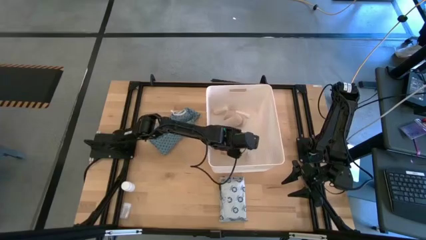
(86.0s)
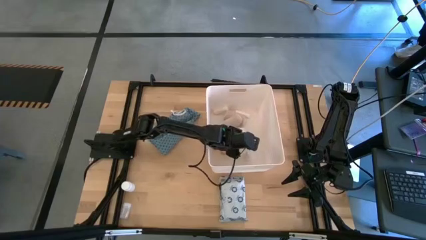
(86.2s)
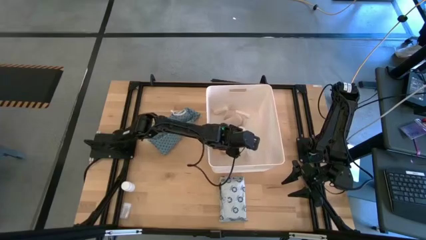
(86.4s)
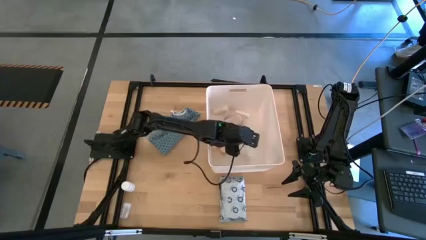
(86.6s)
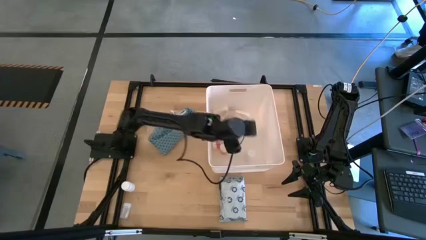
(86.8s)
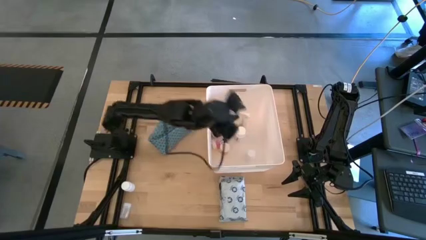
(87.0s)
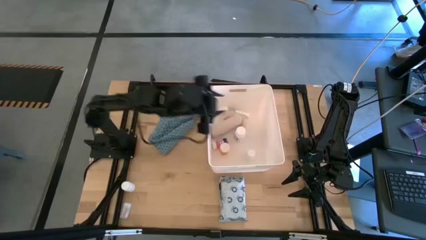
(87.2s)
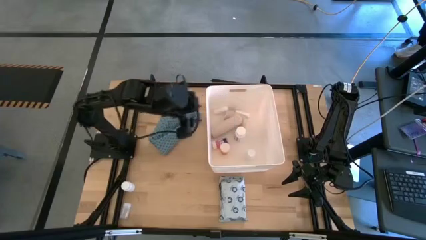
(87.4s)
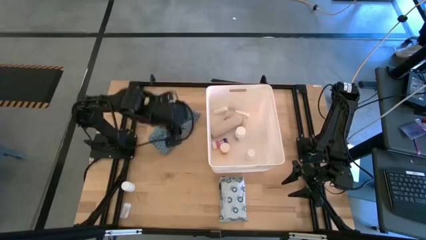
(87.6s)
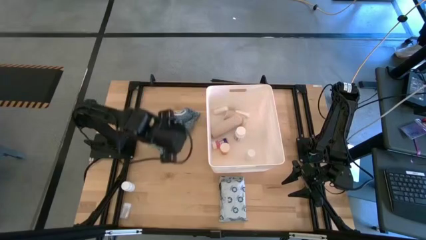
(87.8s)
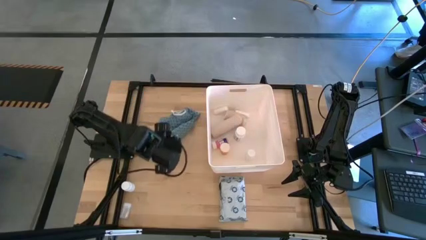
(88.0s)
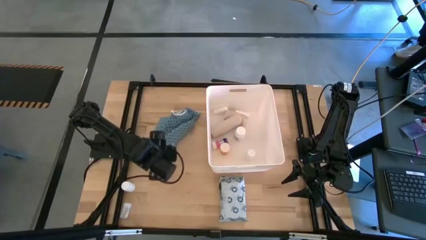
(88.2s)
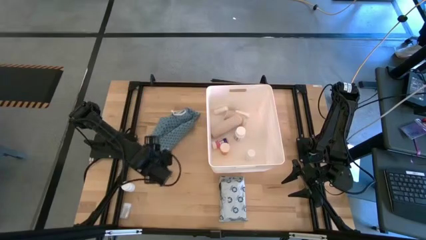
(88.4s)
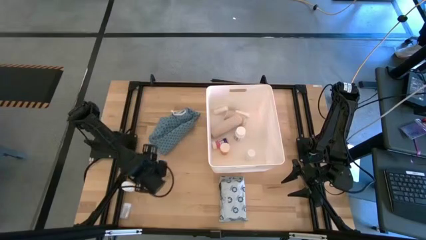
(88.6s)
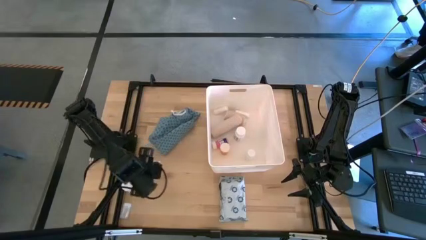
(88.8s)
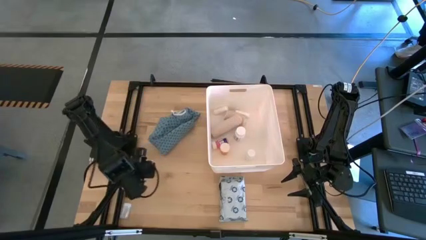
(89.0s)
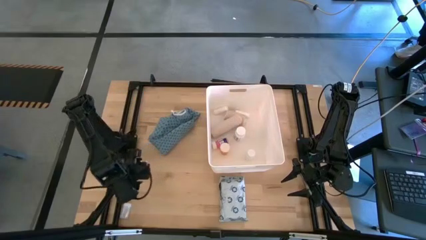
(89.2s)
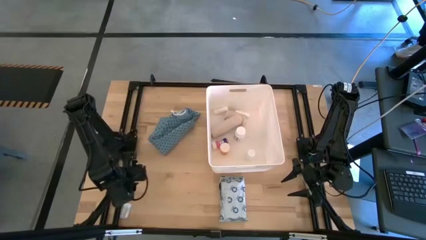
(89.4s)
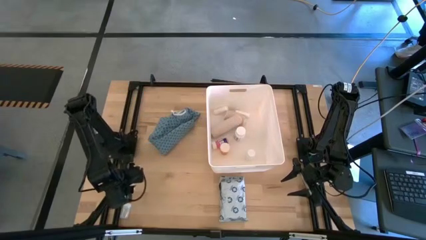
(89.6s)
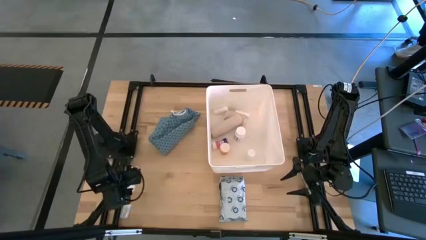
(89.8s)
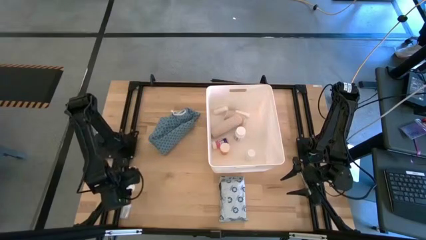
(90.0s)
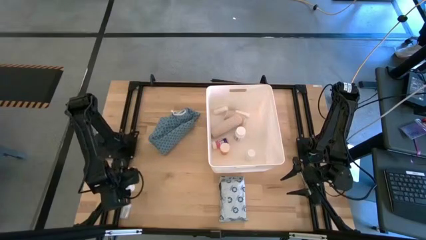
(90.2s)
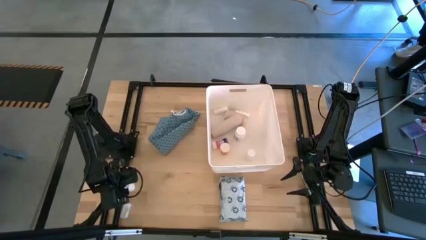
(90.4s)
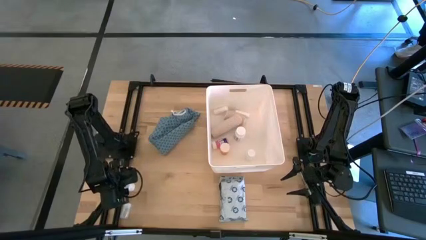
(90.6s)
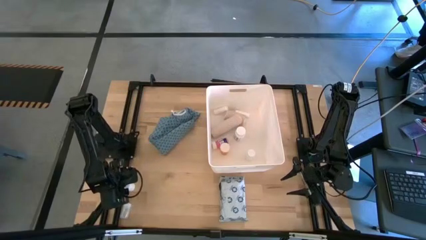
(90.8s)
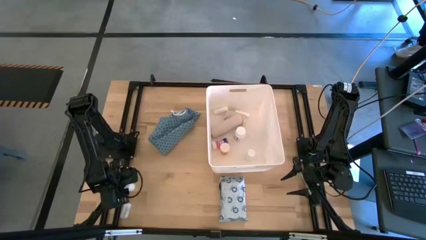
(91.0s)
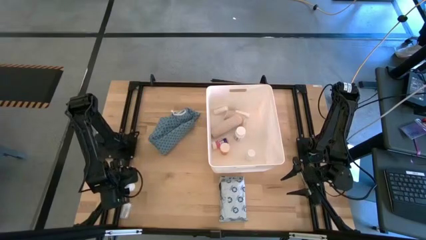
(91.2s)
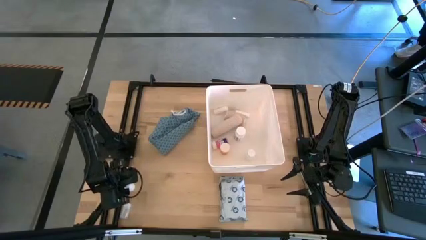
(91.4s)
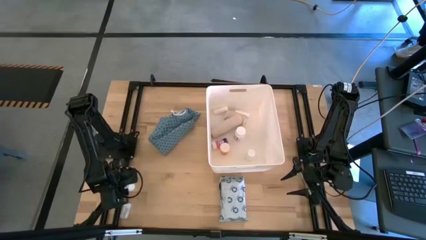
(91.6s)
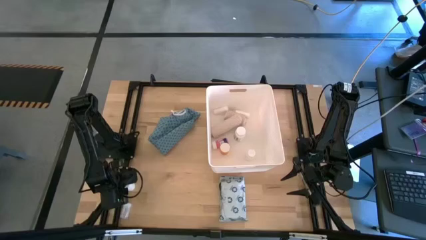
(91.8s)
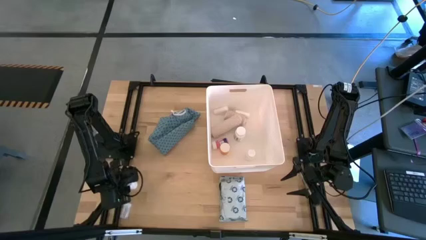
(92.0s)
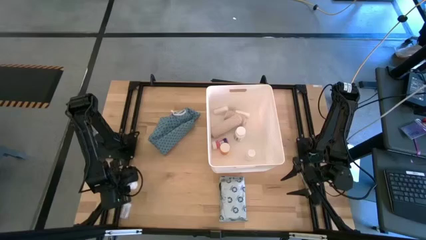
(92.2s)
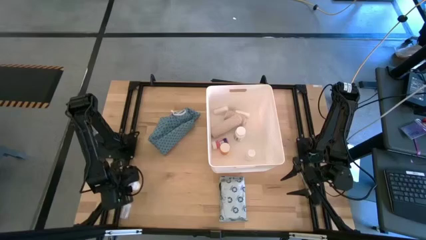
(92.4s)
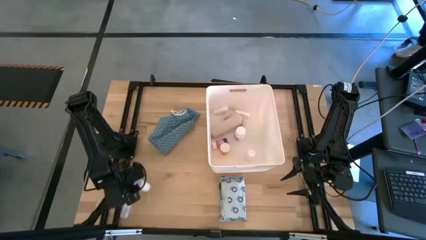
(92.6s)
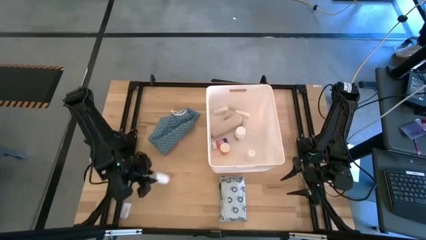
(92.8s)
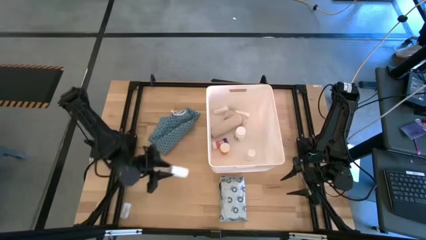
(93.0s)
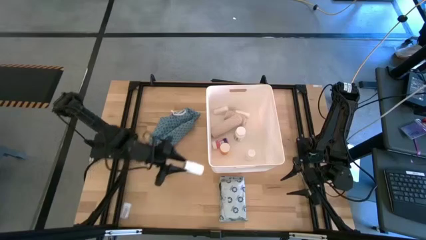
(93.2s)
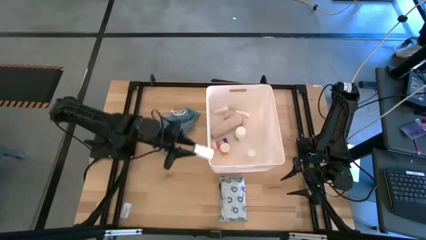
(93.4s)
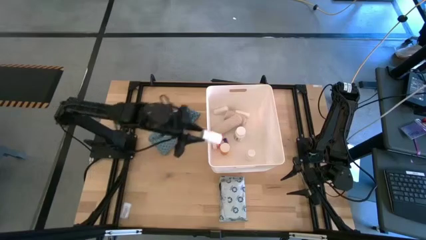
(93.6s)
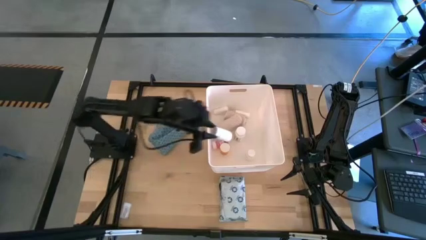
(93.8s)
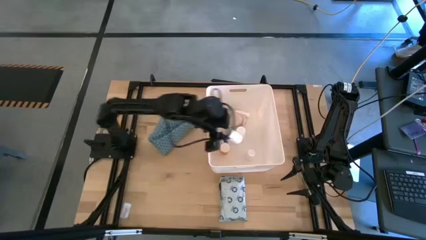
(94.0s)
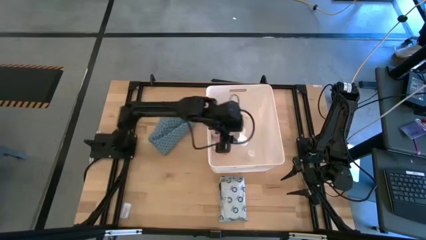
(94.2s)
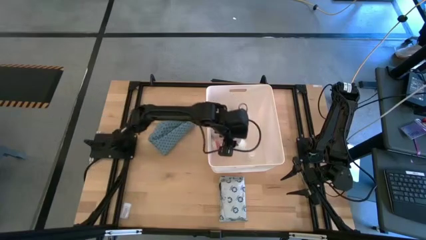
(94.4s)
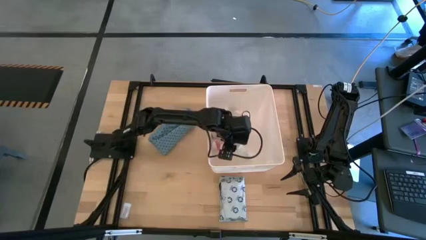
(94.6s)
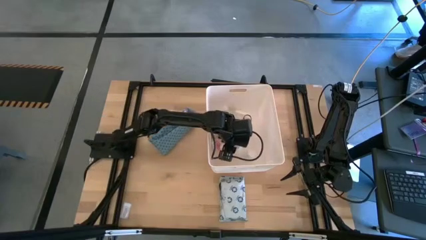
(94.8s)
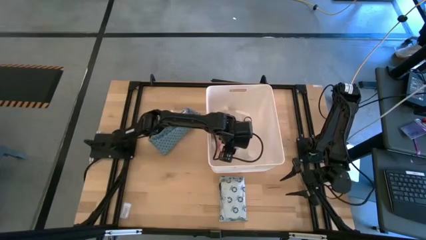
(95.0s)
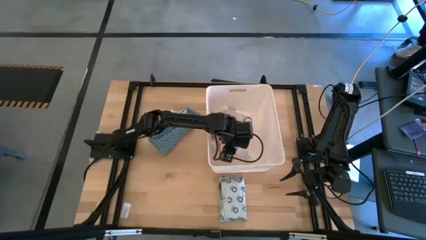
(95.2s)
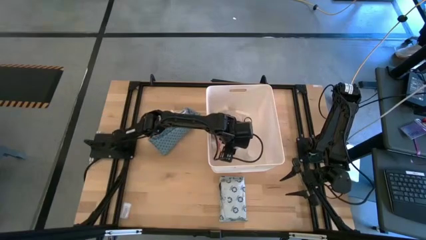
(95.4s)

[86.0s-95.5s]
Task: Pick & place medical supplies in basket/bin
Put the white pill bottle into the white bin

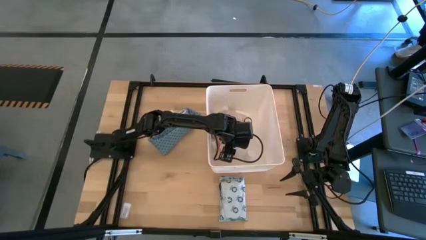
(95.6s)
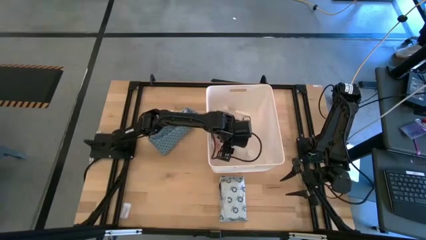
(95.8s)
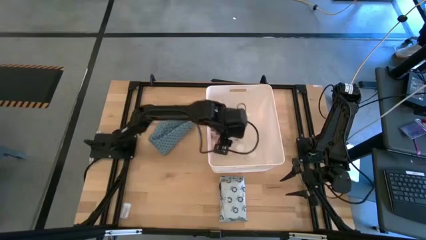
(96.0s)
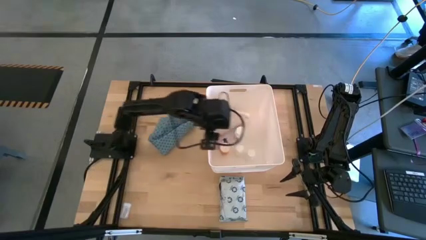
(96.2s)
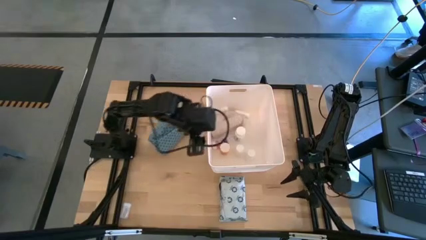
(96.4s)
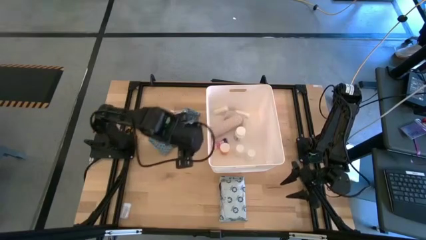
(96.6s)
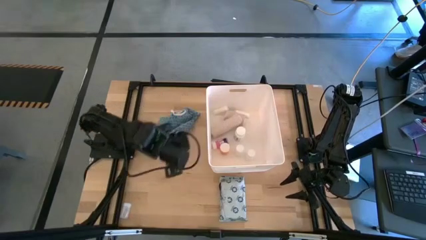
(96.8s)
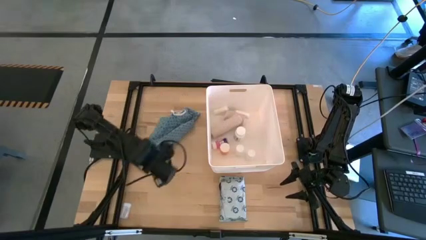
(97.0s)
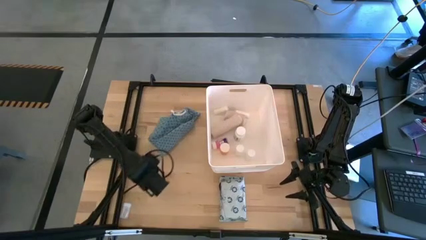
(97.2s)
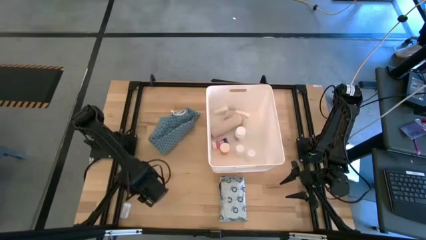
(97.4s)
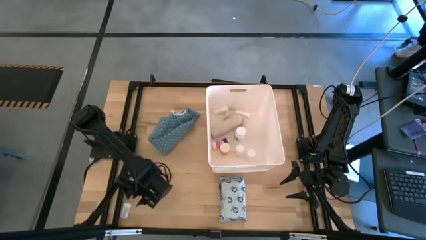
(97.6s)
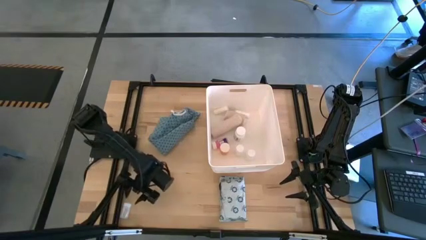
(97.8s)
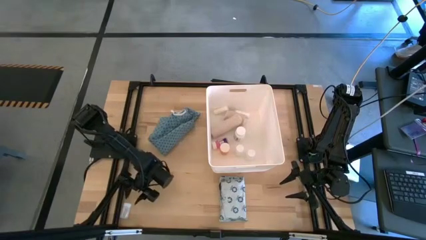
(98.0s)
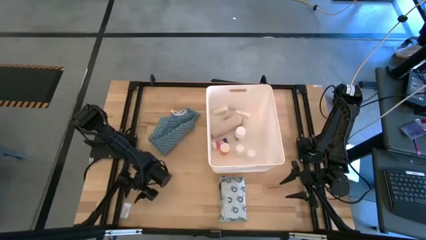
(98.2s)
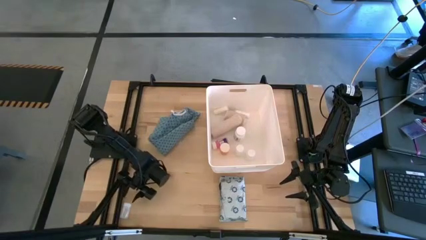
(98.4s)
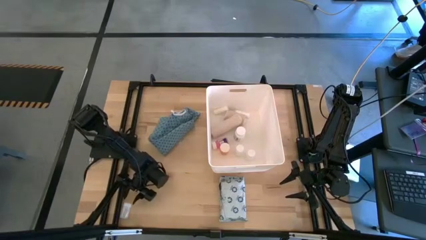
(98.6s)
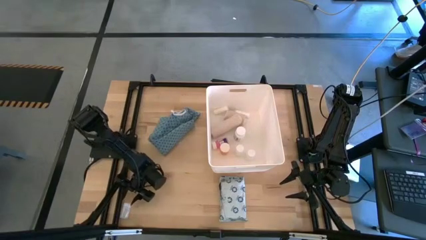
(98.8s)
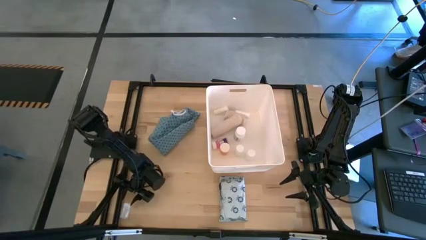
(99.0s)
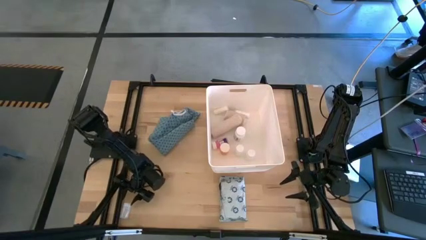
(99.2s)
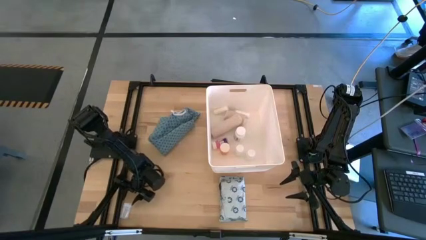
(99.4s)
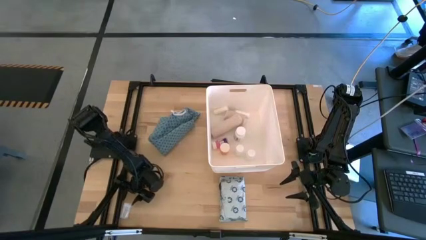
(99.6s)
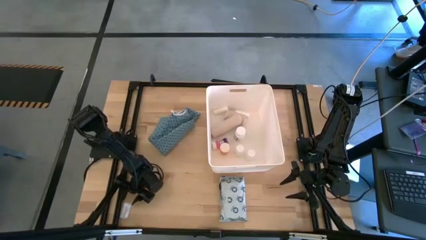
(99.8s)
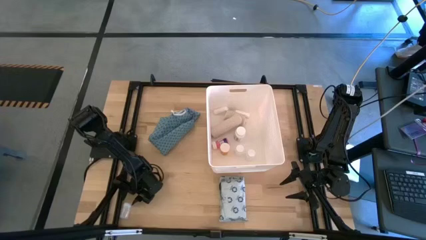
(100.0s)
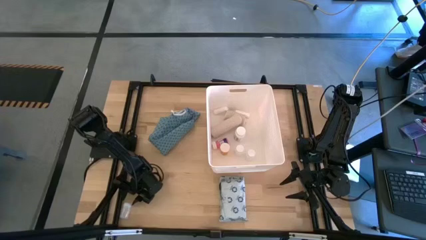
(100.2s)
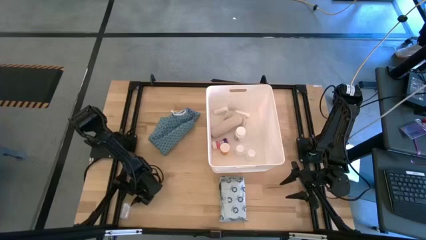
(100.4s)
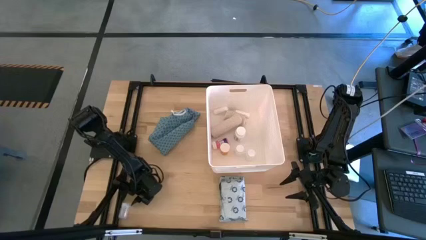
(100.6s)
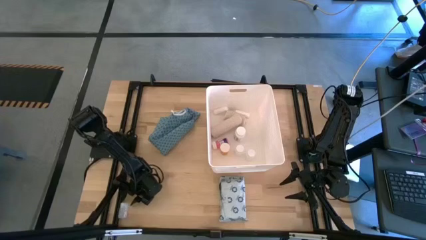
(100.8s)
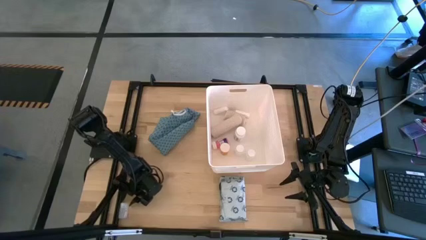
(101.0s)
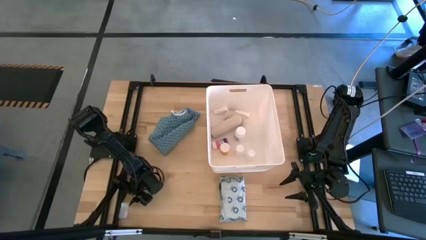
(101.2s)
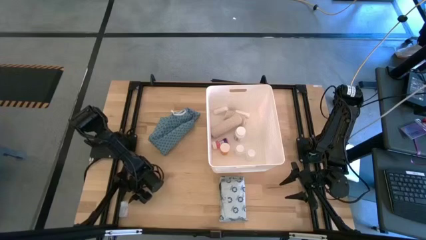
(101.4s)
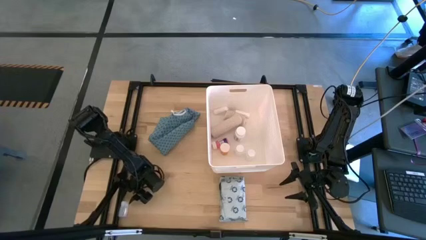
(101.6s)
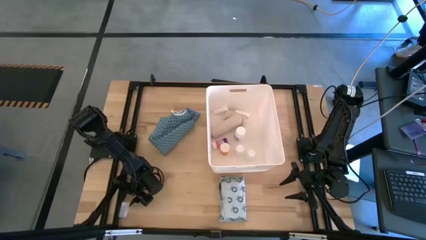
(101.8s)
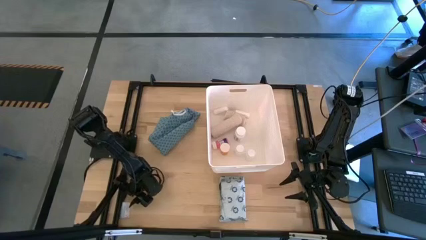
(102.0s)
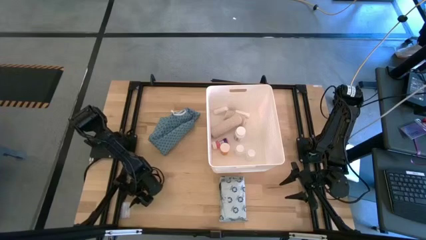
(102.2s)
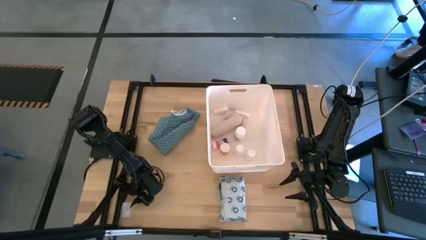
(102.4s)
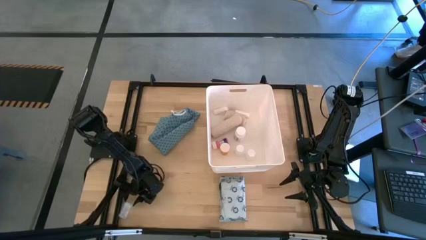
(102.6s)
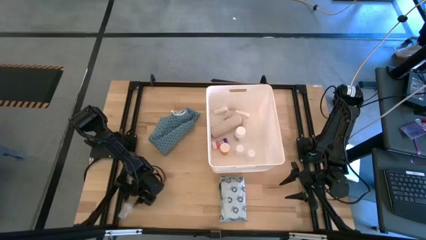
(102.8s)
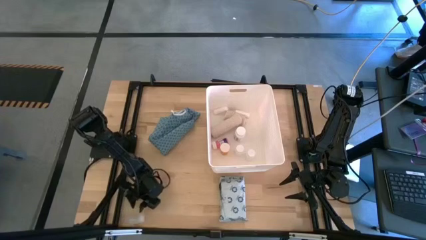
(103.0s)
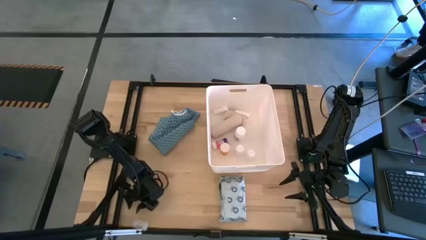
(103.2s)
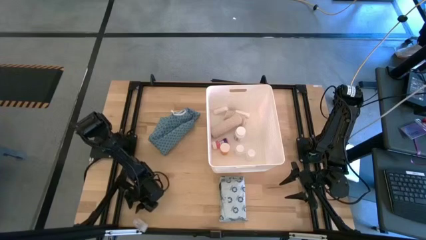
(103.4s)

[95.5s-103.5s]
Put the transparent medicine bottle into the white bin
